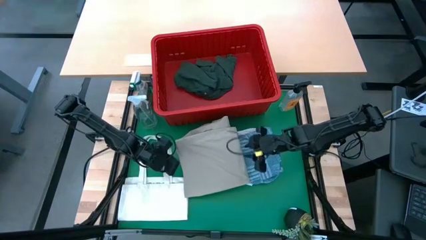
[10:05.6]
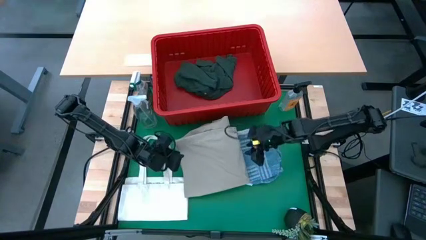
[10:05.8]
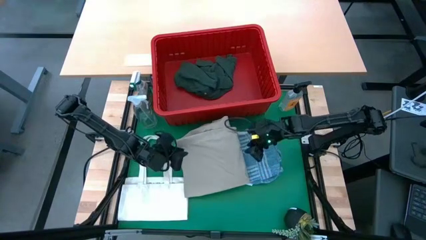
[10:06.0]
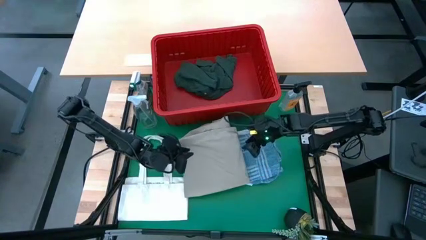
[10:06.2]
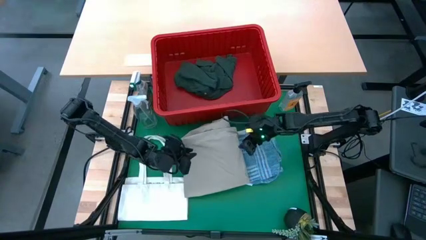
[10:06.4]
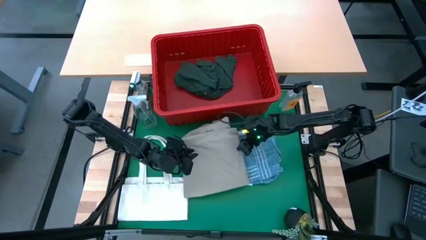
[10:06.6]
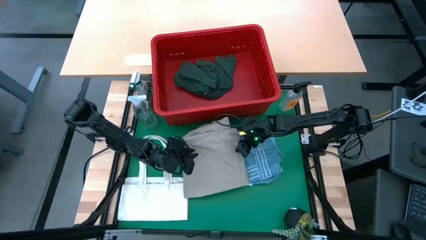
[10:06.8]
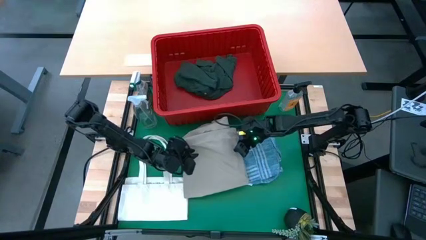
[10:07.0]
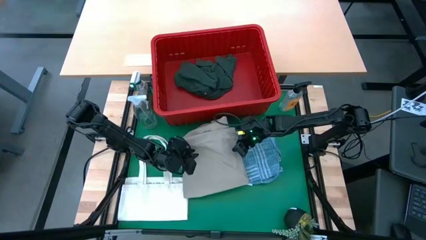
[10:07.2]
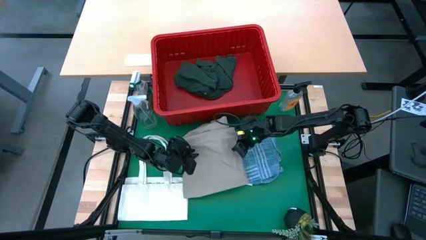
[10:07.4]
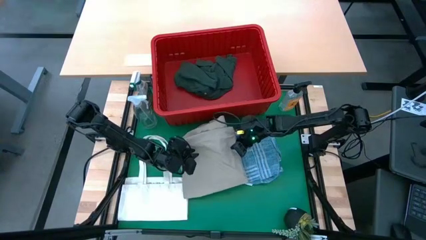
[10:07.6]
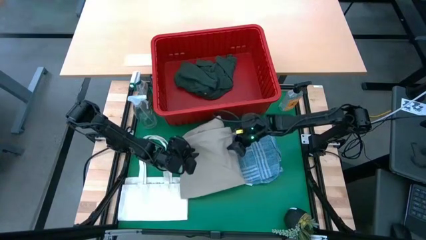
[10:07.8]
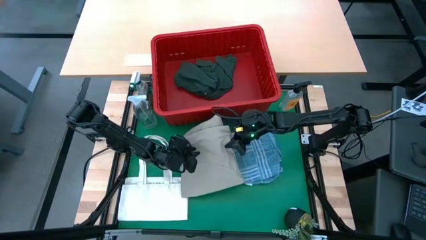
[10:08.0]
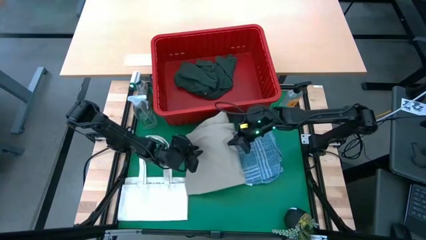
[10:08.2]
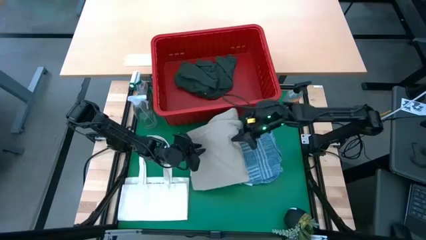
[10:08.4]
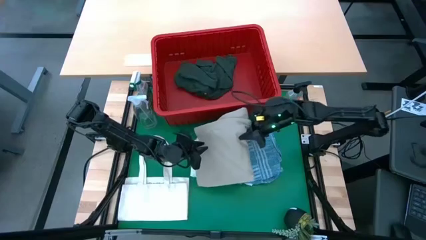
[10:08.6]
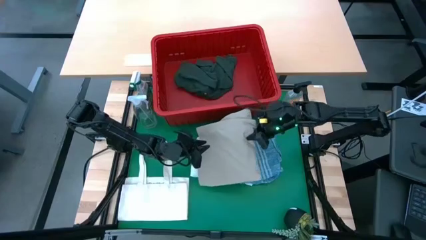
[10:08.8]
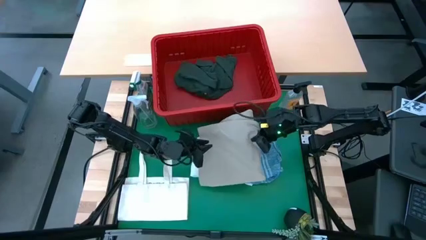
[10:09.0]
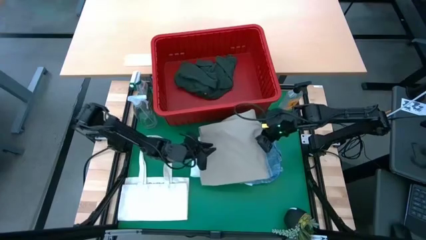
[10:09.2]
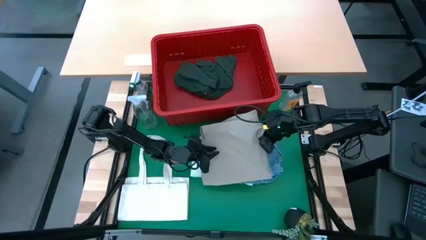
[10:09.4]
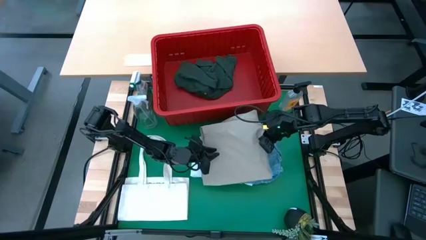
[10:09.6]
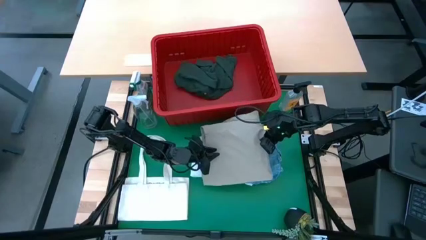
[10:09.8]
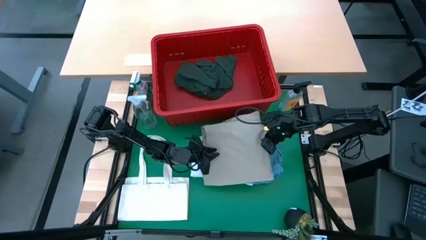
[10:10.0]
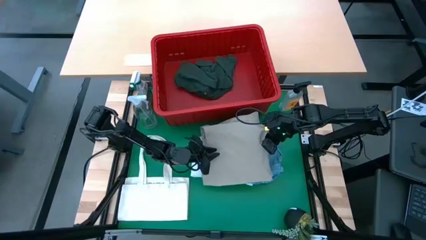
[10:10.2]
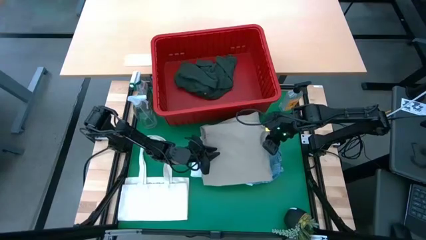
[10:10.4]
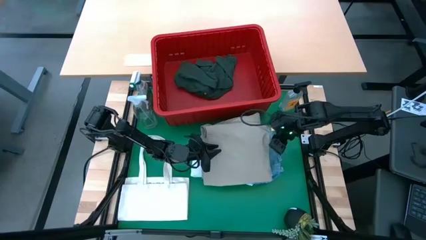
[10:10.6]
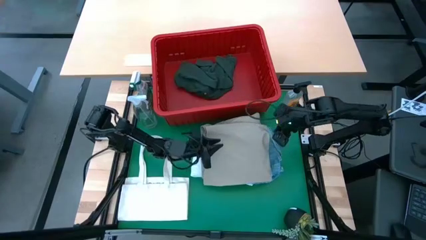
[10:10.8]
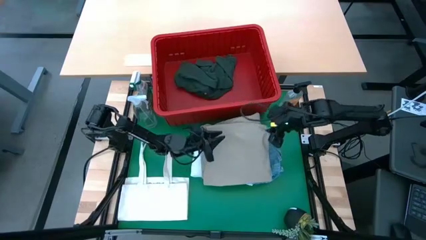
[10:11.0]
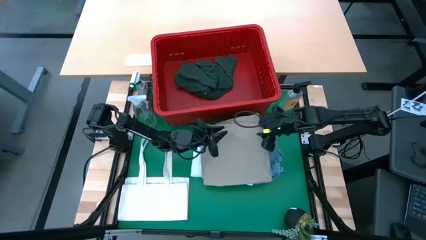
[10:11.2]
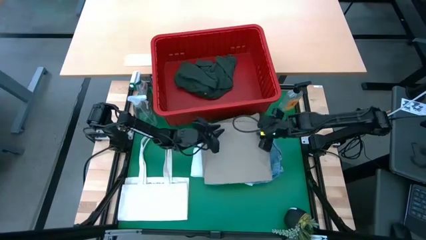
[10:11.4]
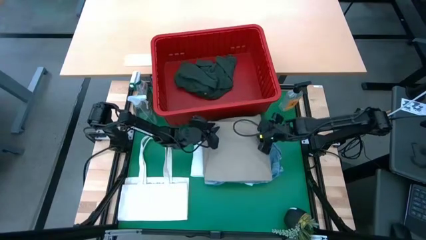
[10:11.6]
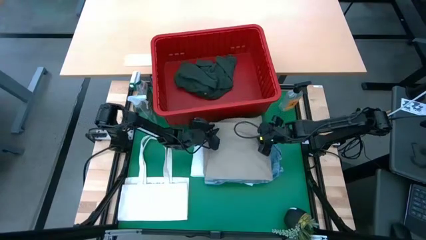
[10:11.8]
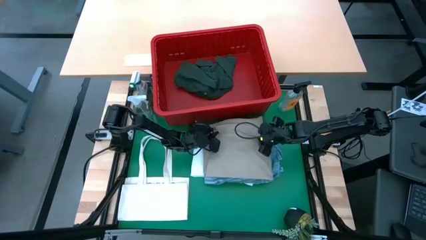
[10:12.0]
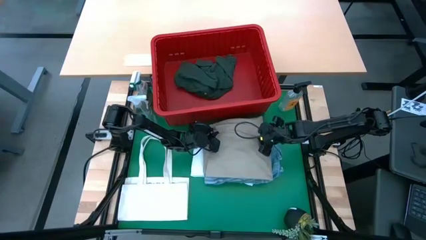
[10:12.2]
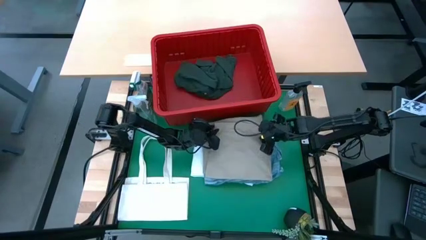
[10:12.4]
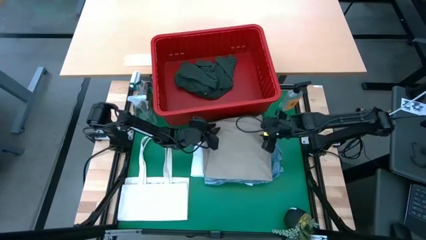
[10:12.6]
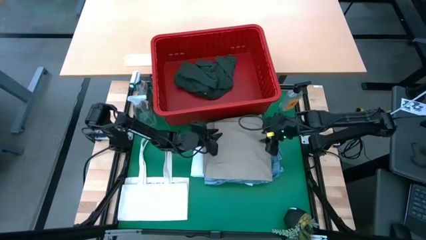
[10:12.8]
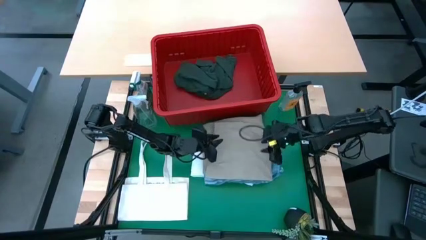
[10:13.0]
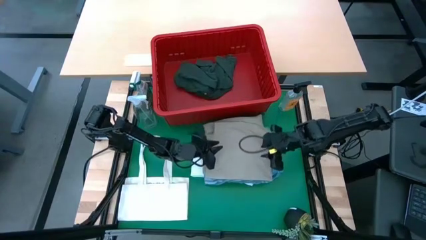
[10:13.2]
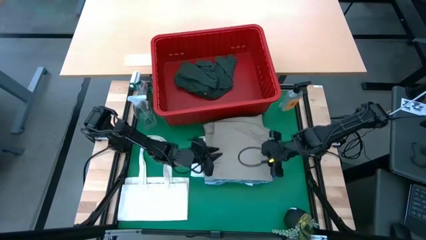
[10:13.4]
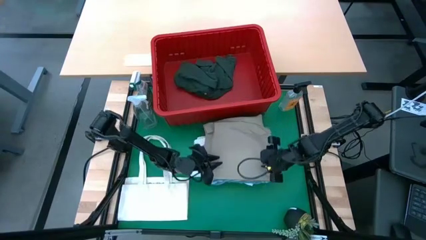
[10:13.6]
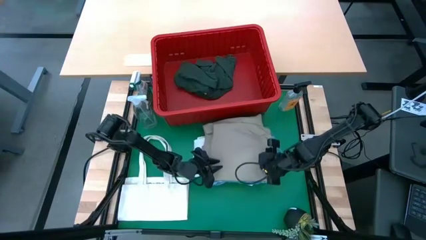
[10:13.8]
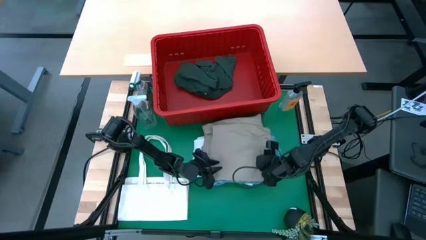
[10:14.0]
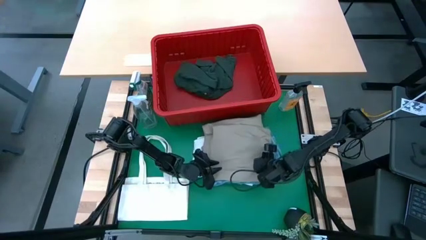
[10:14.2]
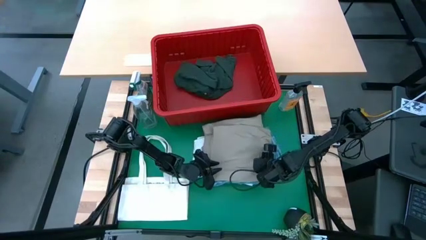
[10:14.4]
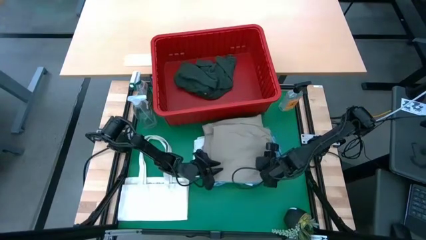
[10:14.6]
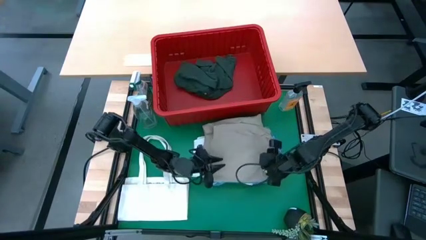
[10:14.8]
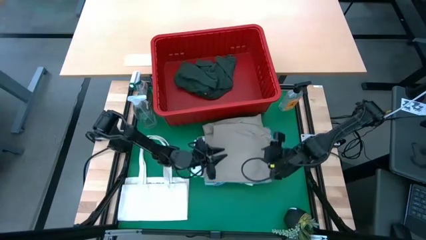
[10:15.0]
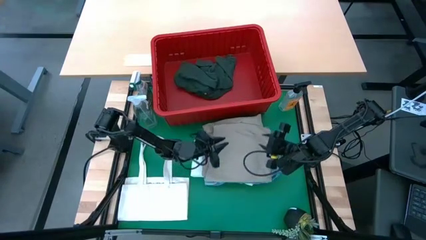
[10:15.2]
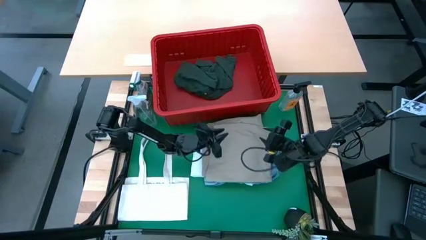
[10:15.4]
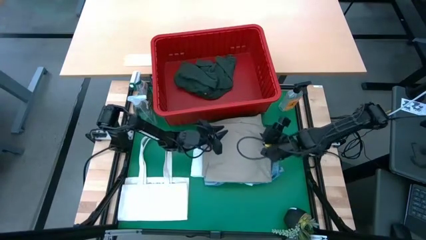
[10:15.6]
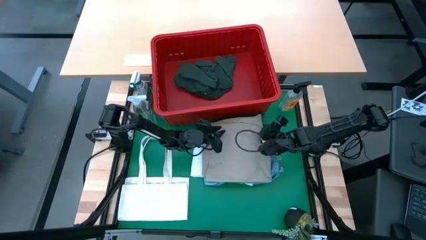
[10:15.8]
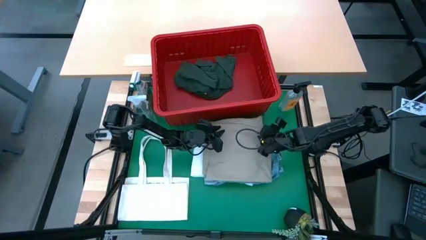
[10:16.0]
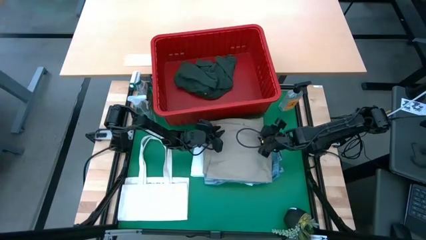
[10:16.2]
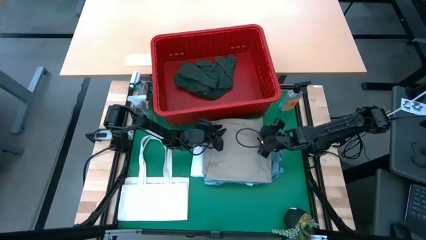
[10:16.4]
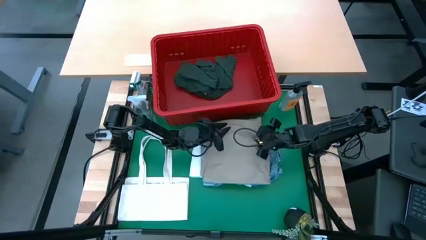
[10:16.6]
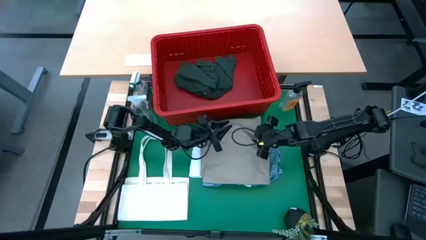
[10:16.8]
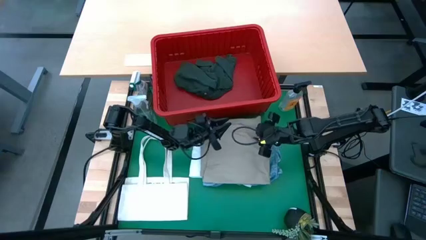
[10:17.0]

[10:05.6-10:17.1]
Task: Fold Laundry from Bin
Stack the light brown shorts on top of the folded blue checkered polo shirts
